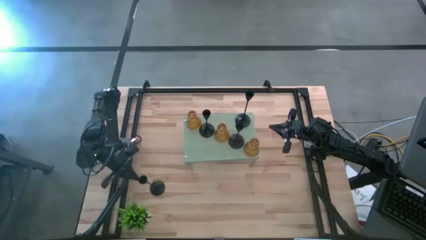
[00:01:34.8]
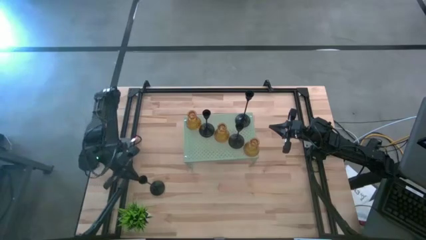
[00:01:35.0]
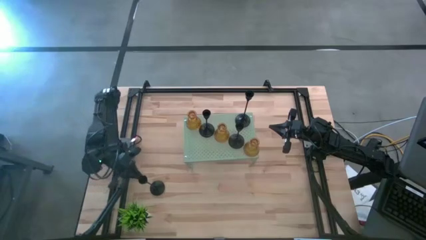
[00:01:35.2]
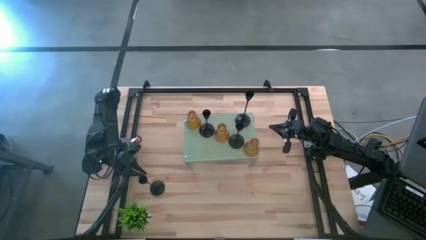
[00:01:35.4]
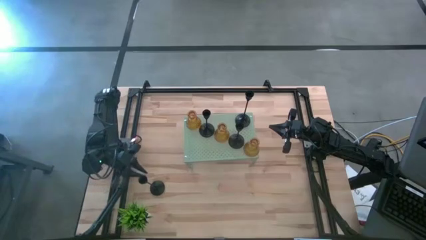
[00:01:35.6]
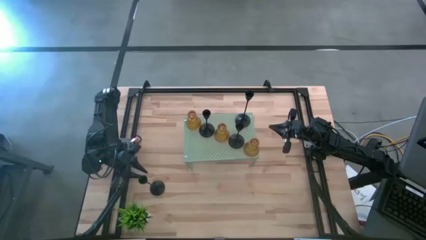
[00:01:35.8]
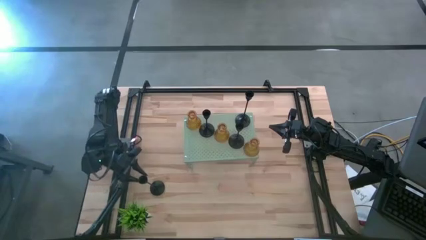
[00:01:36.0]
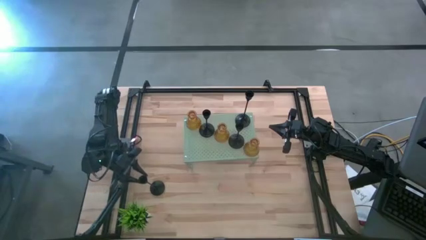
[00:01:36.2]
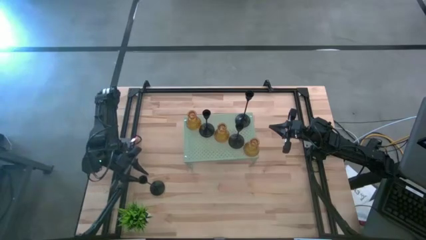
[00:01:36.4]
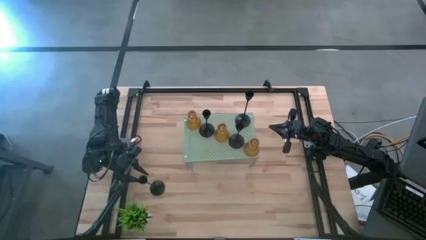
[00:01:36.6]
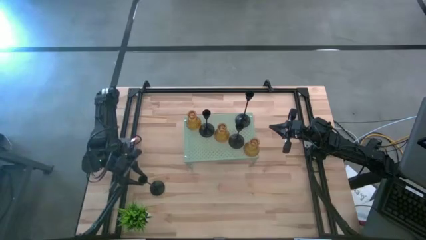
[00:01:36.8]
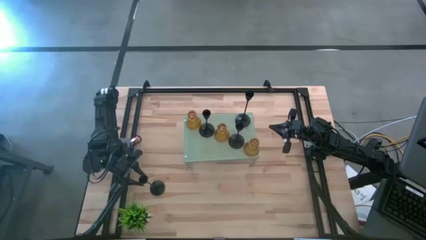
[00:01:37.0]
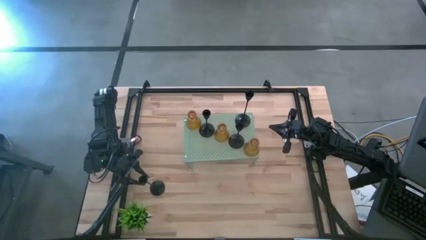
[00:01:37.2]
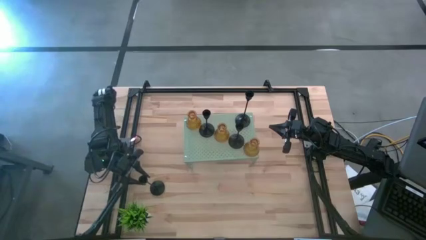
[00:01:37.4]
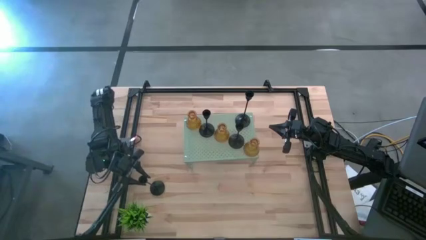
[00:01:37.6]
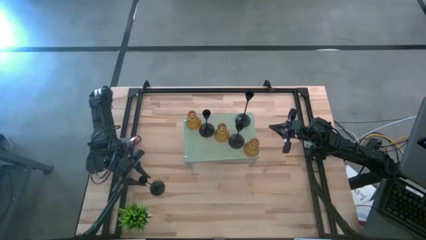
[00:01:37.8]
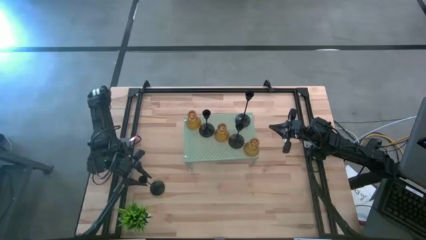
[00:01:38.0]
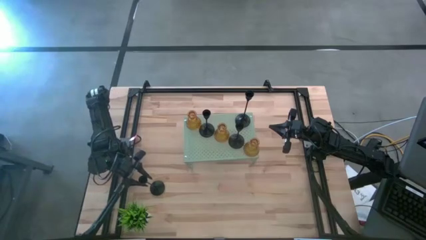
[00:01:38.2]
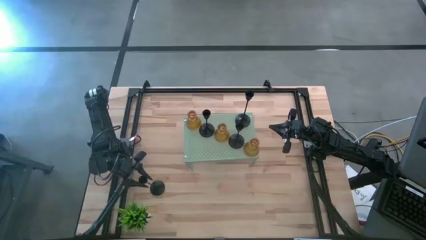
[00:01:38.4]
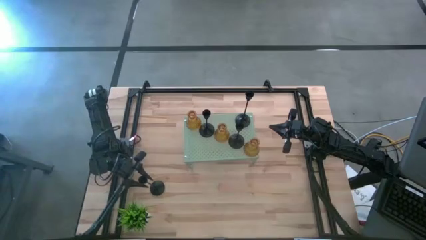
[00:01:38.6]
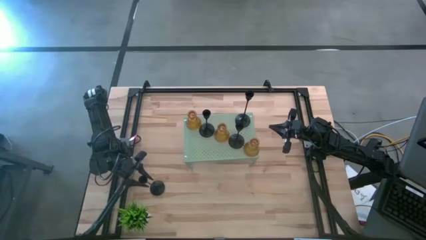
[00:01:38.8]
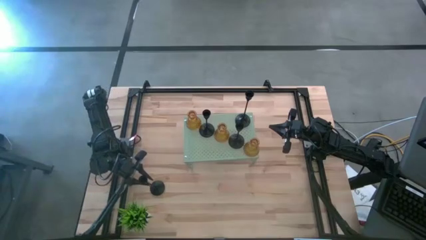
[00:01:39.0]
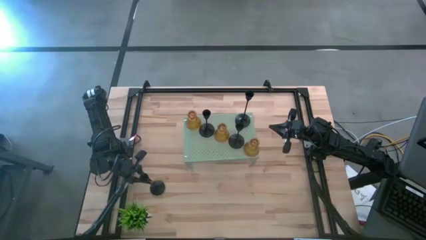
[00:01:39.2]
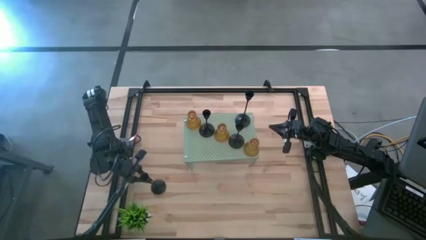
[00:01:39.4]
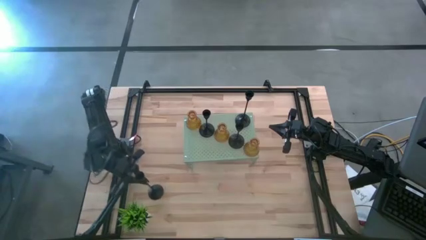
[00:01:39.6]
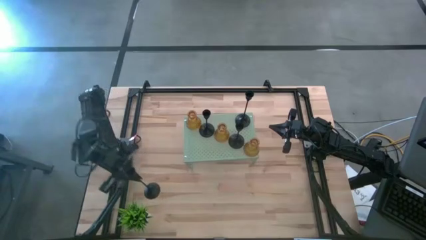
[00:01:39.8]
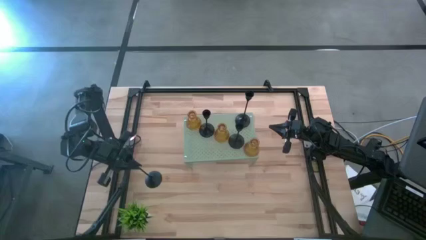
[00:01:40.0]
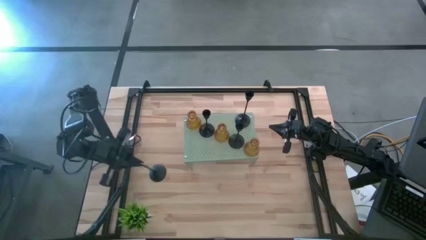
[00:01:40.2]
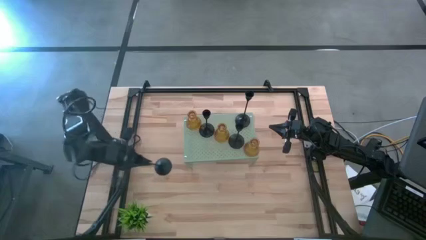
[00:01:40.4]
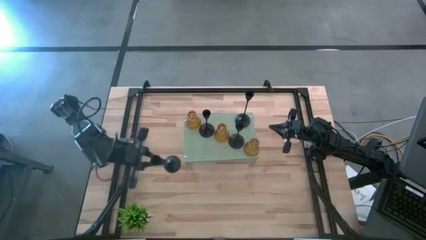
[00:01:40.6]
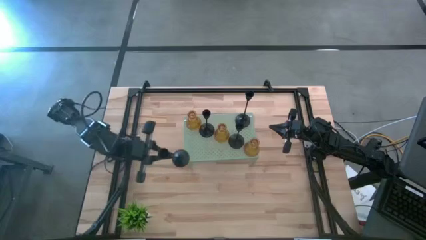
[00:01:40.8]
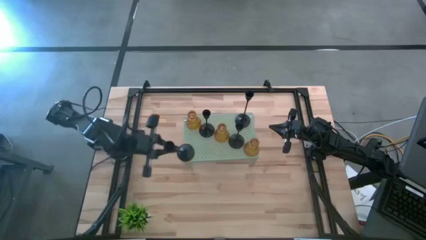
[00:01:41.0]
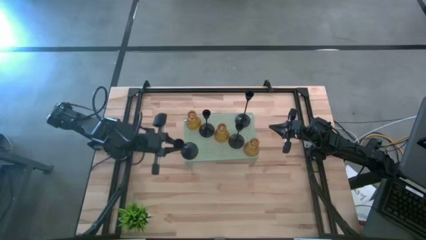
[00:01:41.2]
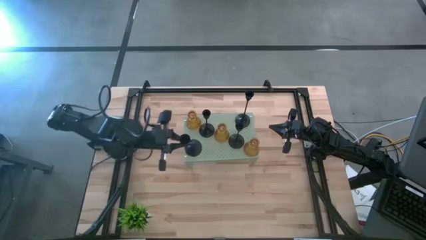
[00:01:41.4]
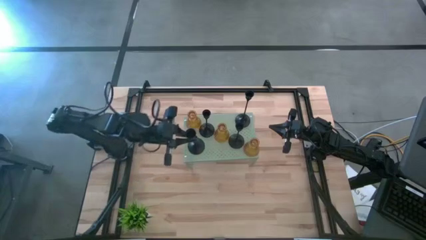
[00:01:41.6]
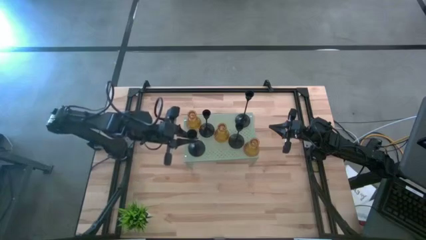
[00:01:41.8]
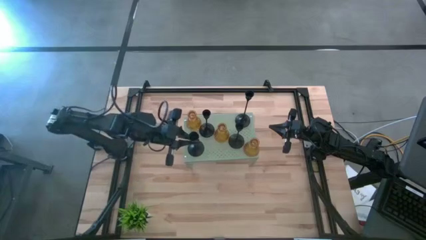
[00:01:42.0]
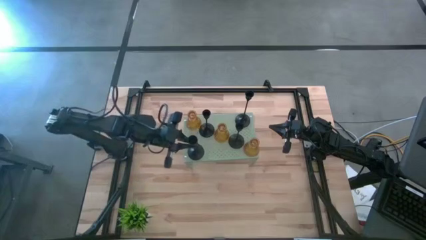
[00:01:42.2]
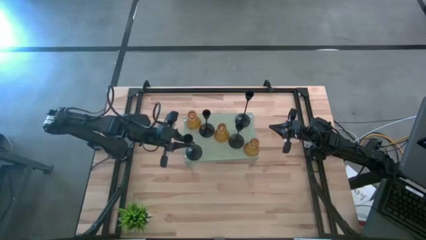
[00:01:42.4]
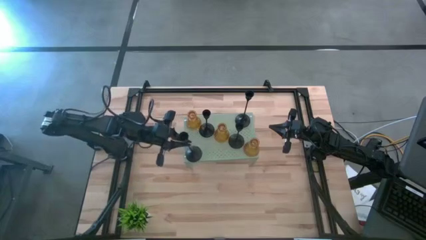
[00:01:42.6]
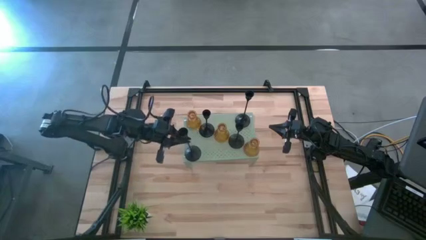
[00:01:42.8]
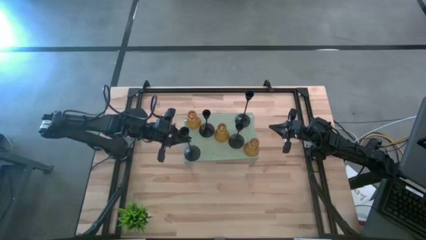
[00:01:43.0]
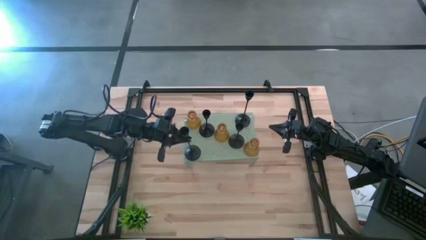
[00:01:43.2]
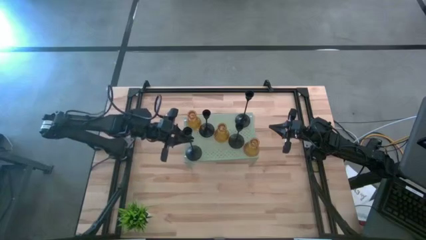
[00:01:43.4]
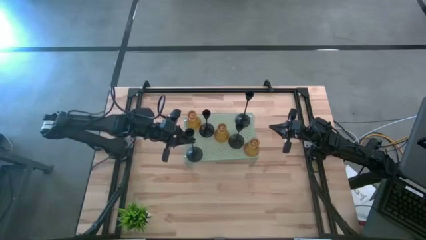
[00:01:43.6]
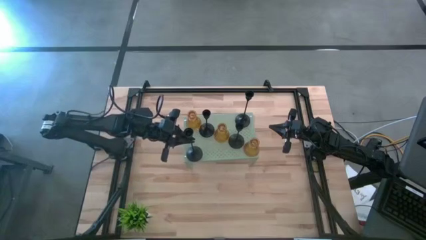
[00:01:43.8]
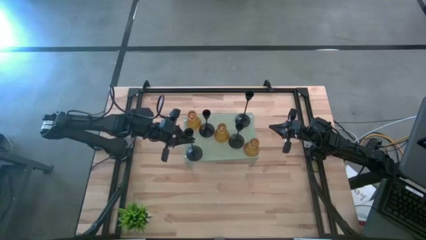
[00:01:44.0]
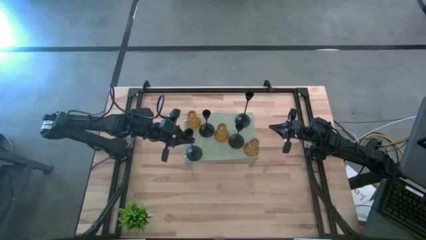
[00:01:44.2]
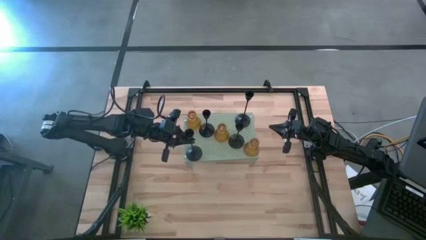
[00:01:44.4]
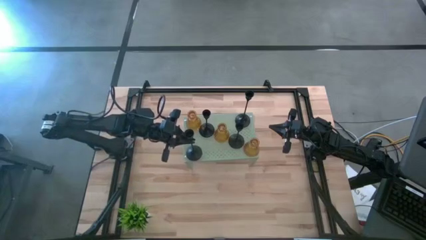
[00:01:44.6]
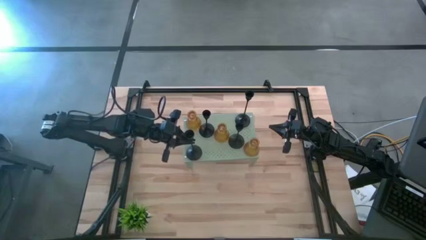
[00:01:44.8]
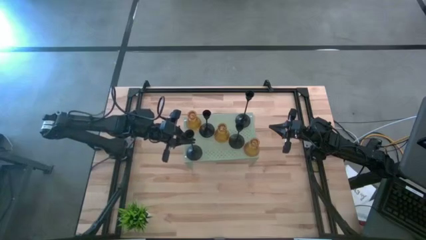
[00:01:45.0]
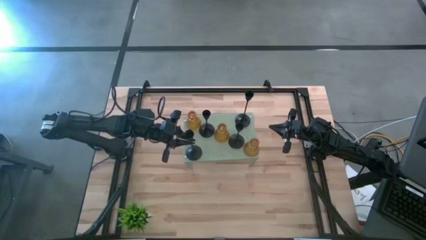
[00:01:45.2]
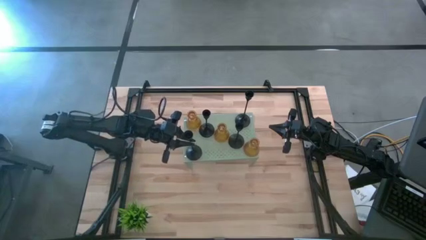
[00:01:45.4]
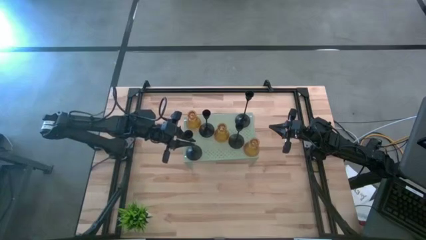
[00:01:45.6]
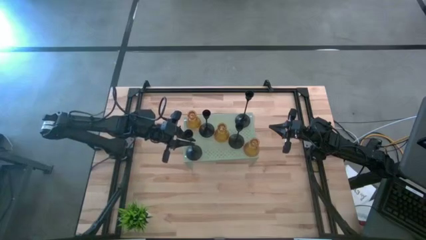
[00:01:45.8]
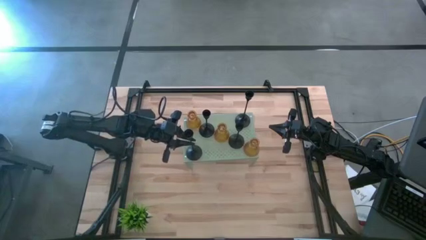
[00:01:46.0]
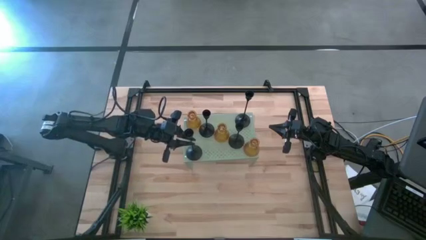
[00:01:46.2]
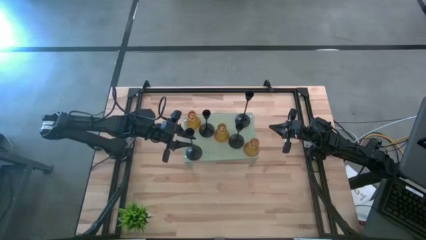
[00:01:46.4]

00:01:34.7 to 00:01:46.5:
Task: Pick & Place candle stick holders
Put the black candle holder on the shelf

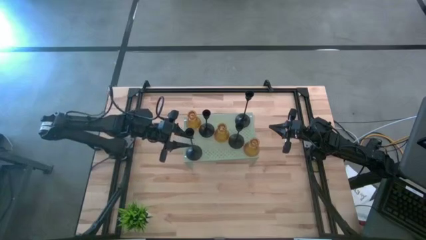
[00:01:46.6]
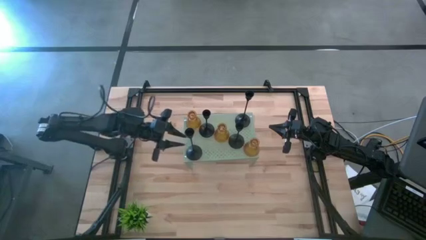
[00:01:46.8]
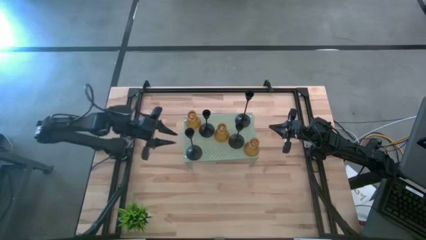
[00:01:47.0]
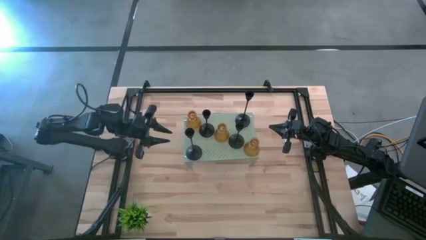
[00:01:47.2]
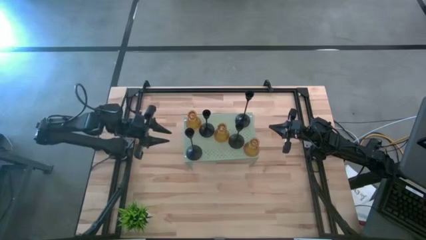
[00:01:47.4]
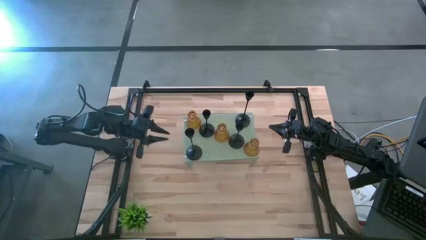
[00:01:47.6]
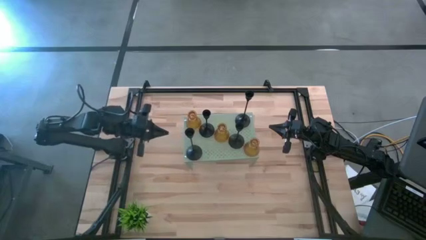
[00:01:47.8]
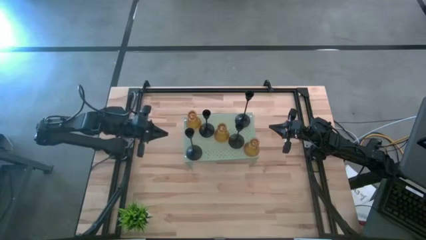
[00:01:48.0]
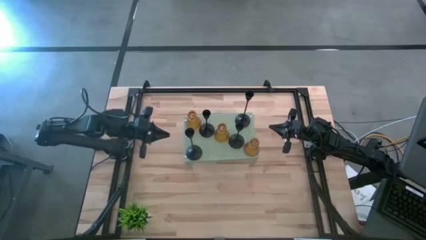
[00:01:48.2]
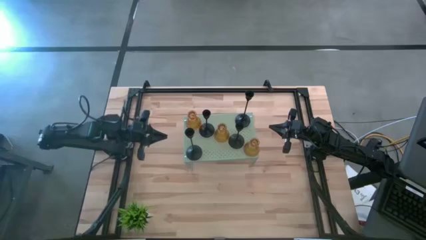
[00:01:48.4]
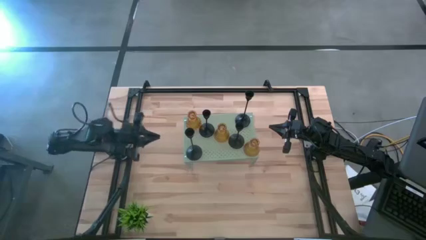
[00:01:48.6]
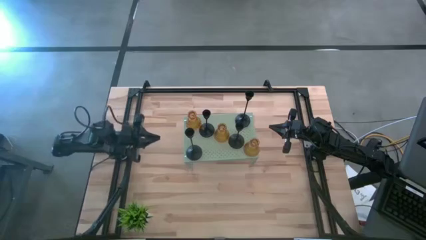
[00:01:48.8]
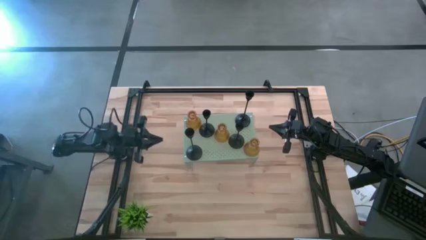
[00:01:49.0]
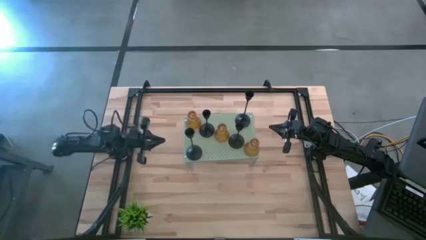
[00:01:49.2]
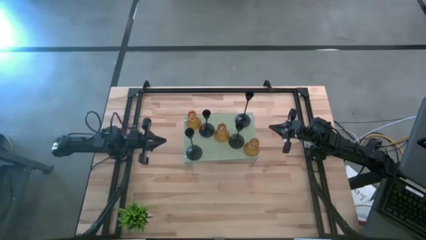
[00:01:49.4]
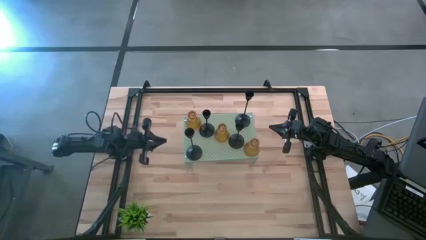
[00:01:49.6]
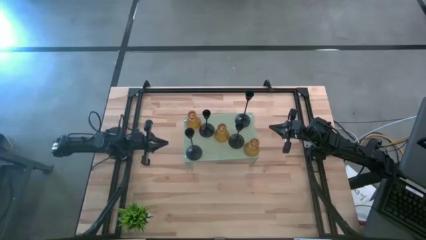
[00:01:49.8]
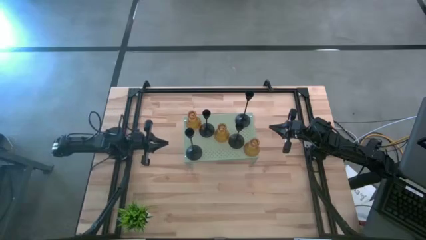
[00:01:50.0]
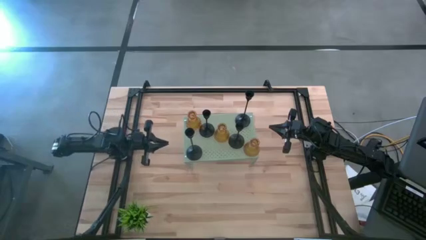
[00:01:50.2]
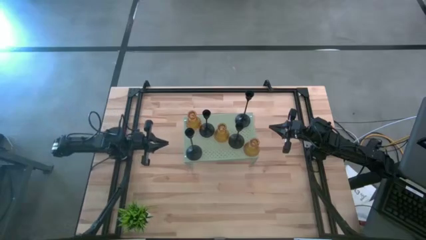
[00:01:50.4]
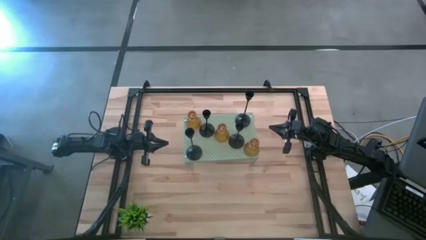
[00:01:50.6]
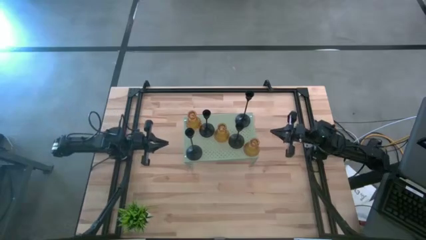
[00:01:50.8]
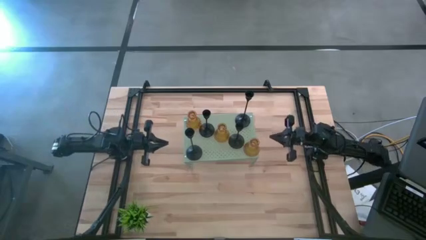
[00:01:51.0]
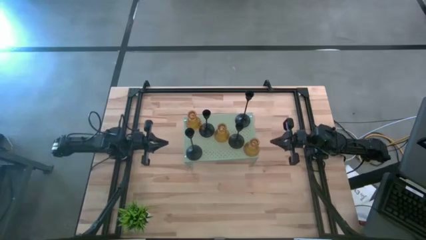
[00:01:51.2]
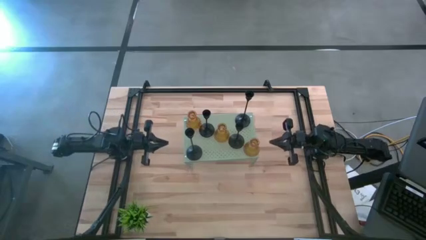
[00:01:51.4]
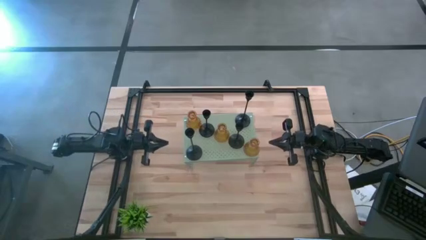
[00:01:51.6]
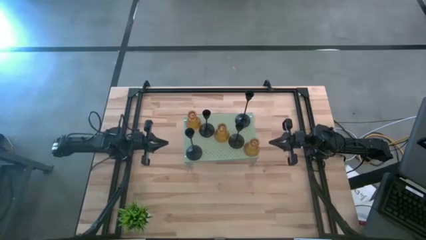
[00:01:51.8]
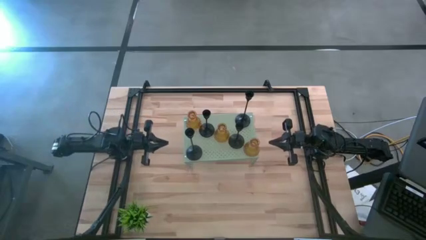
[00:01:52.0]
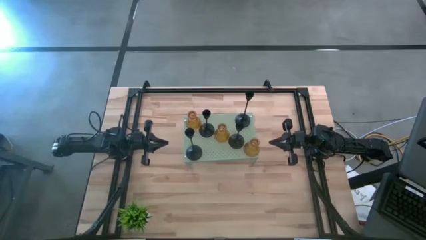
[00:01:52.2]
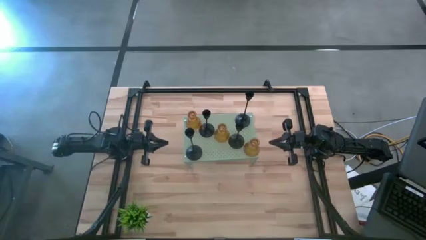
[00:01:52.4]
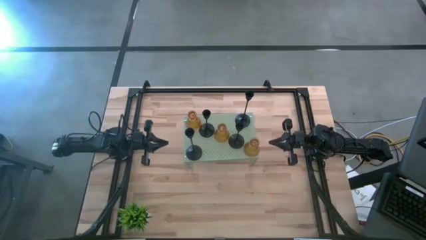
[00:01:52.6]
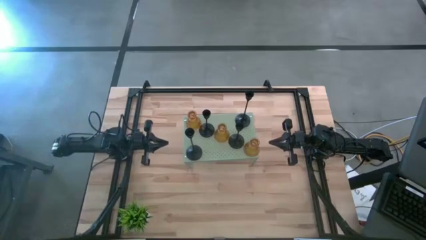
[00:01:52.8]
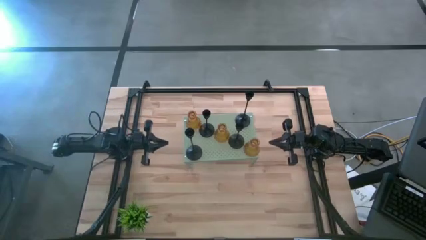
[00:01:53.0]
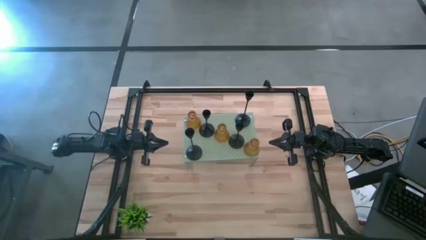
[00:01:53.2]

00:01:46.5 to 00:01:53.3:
Return to Home Position
